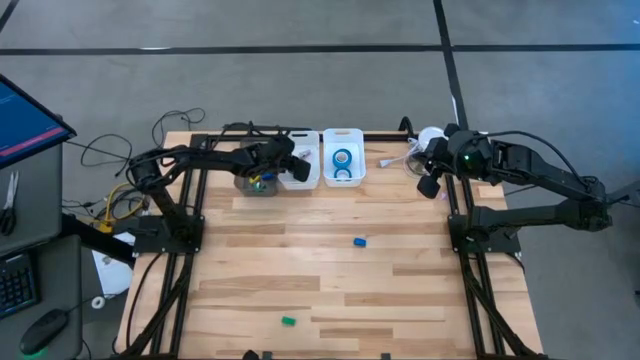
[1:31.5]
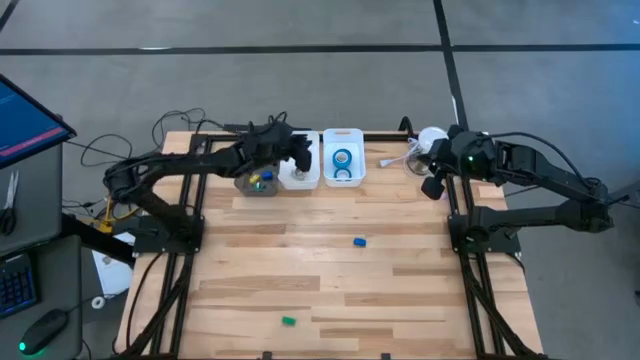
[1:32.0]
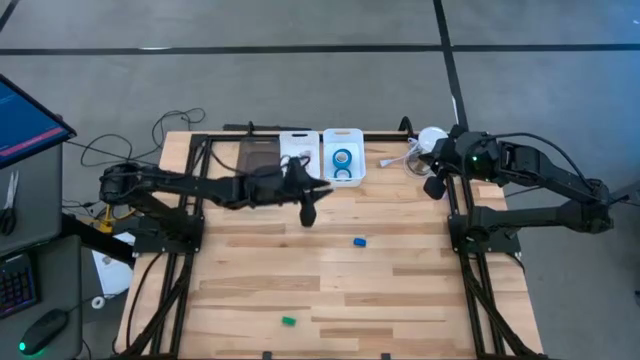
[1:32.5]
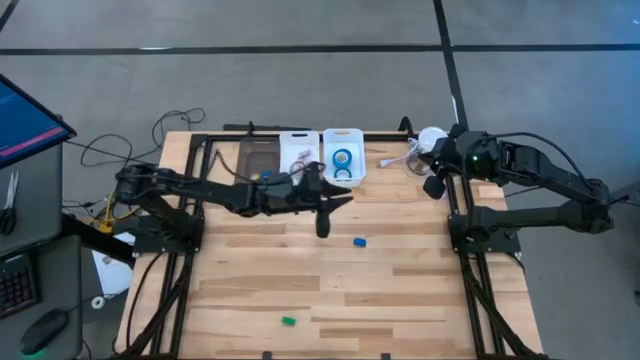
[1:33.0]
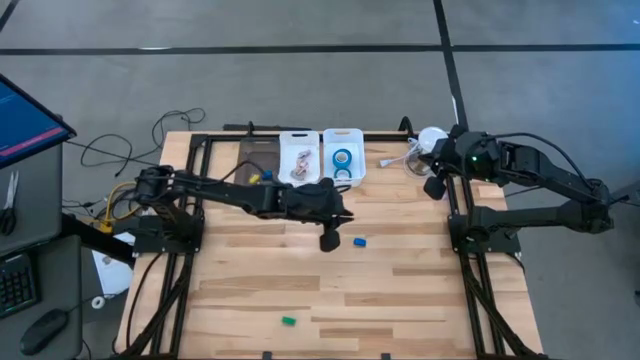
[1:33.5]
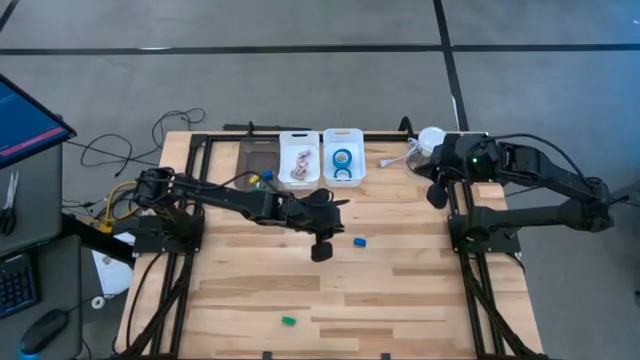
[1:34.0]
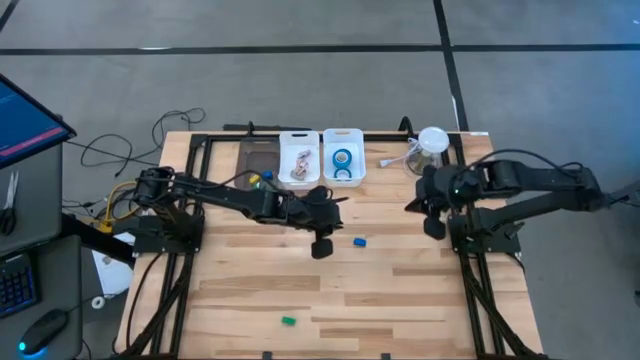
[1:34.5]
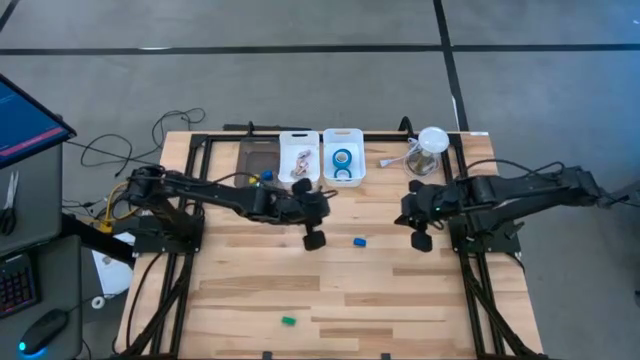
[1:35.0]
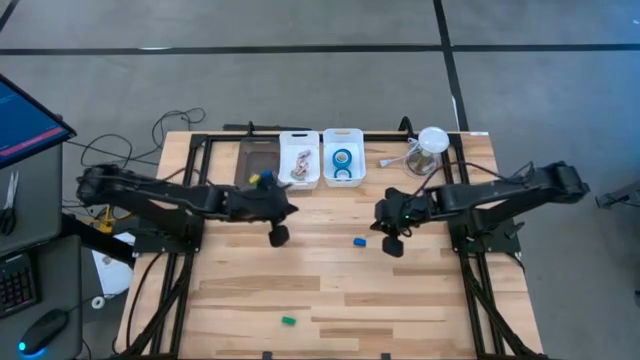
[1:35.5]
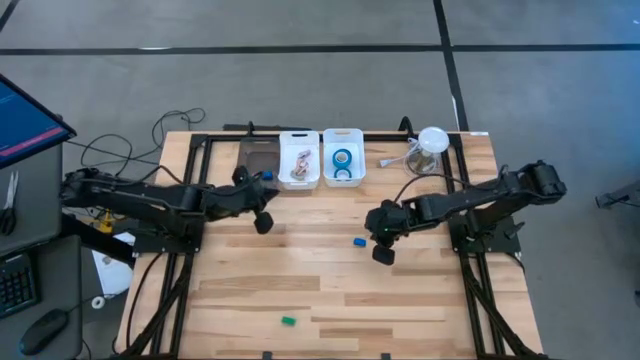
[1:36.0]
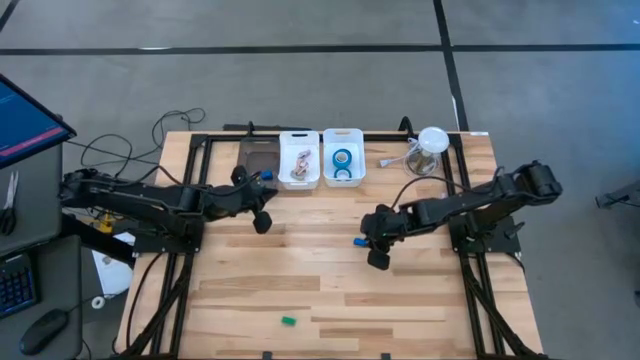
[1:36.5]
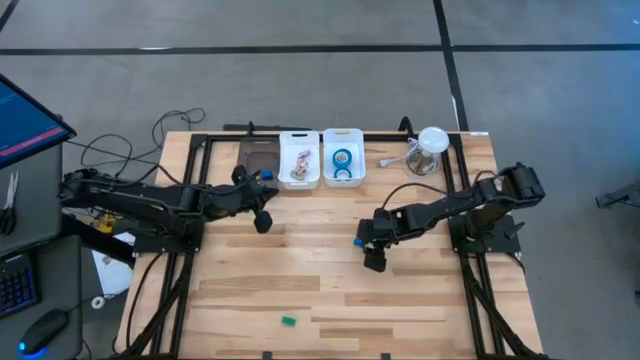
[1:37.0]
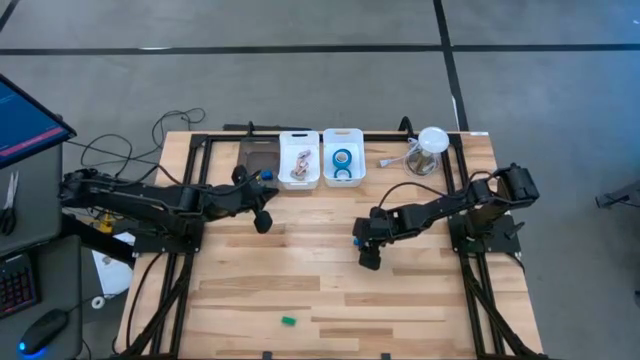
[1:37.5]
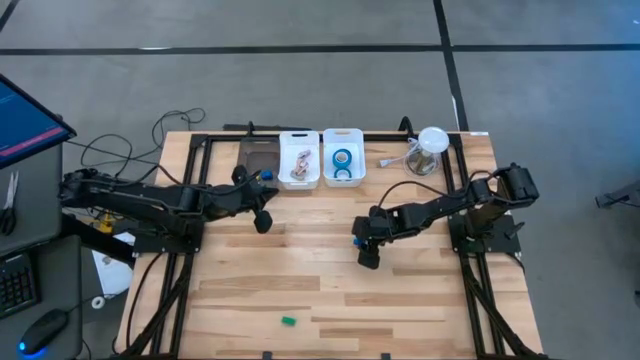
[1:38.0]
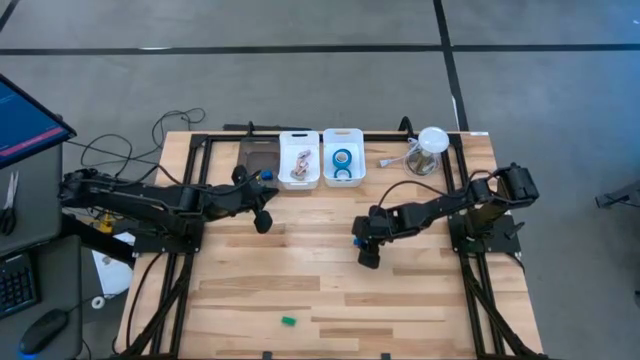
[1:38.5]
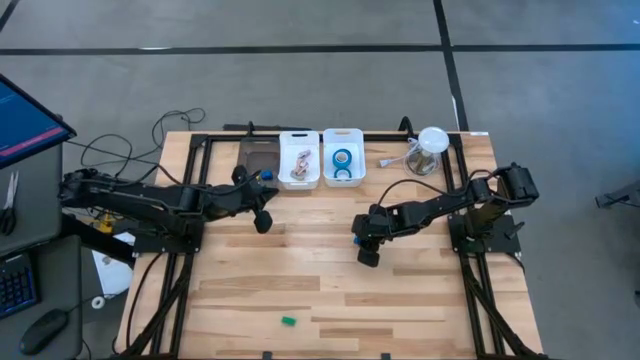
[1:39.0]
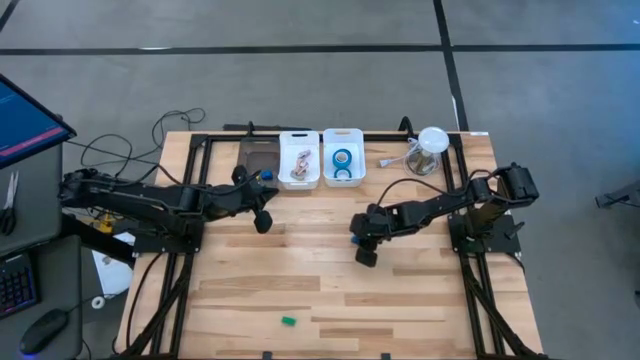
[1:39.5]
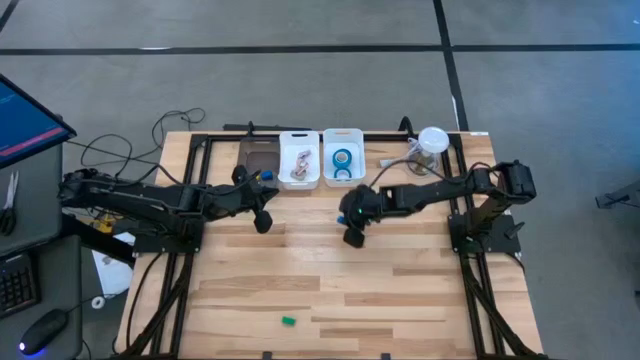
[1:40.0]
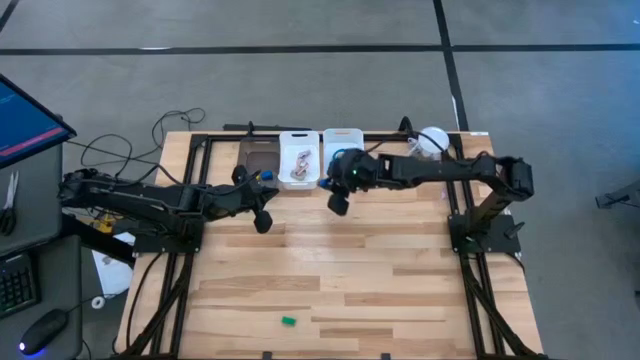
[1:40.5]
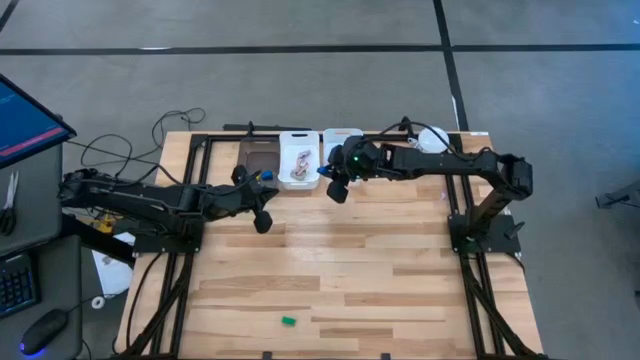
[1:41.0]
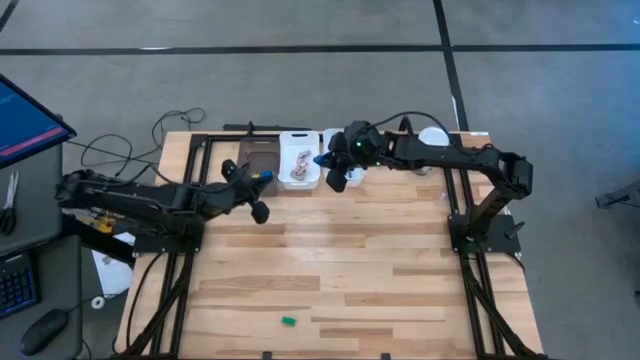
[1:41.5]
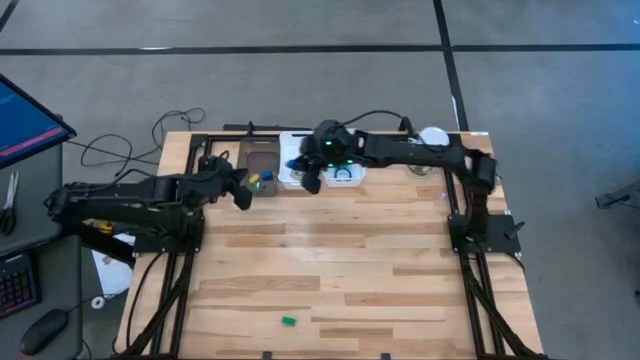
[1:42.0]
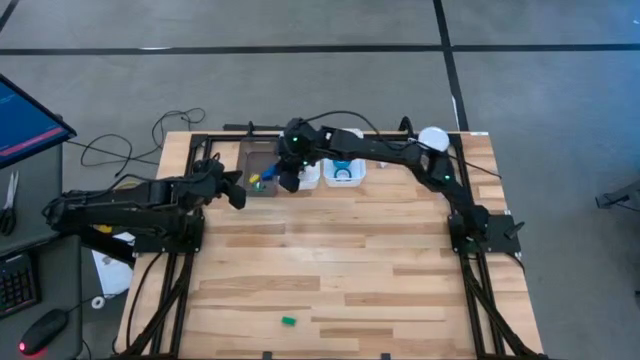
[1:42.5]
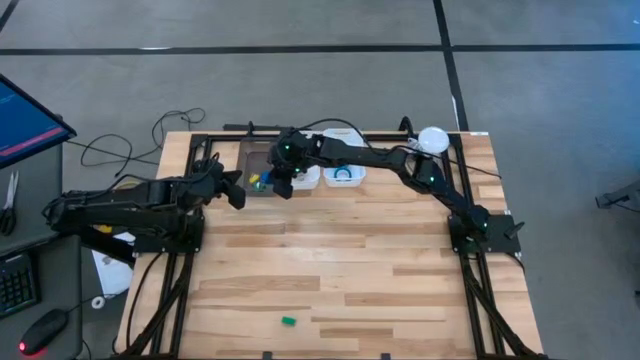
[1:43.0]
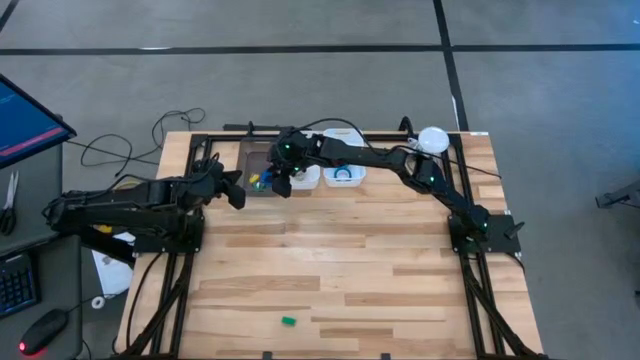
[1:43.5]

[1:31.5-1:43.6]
Task: Pick and place Stapler, Stapler remover, tape
Put the blue stapler into the black bin

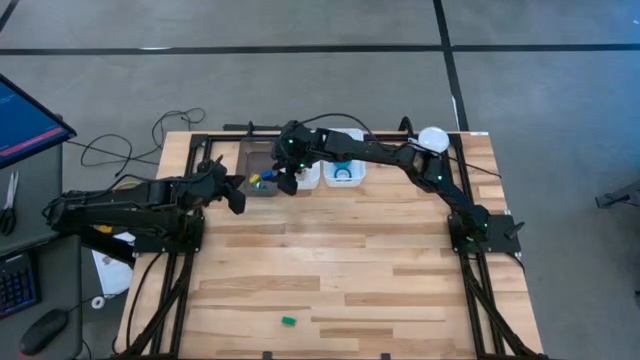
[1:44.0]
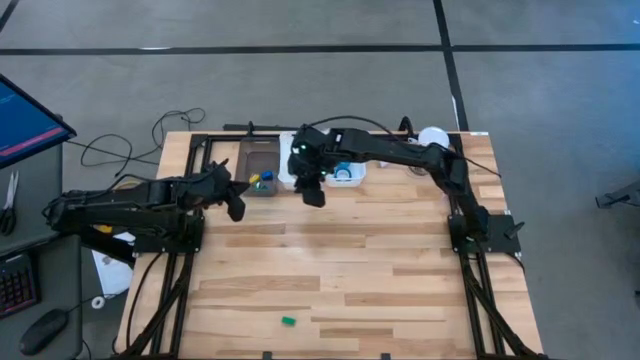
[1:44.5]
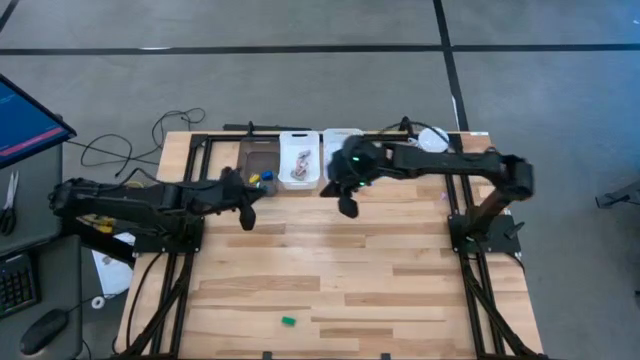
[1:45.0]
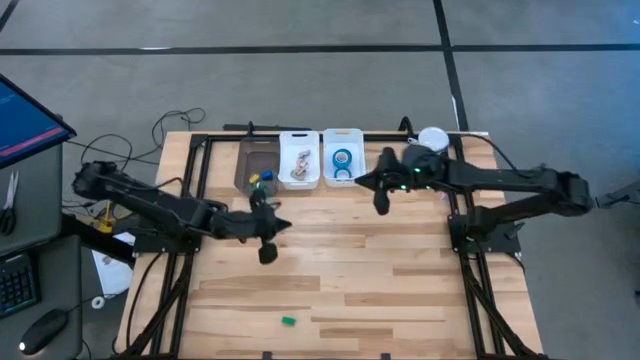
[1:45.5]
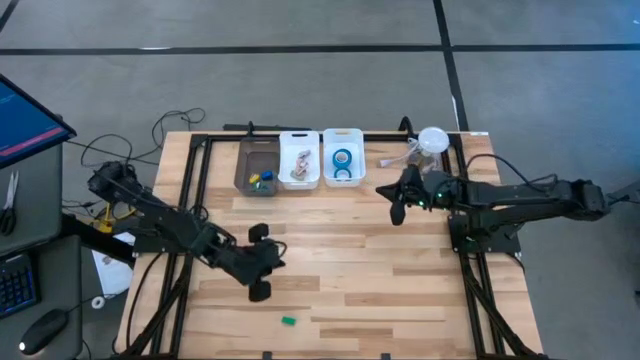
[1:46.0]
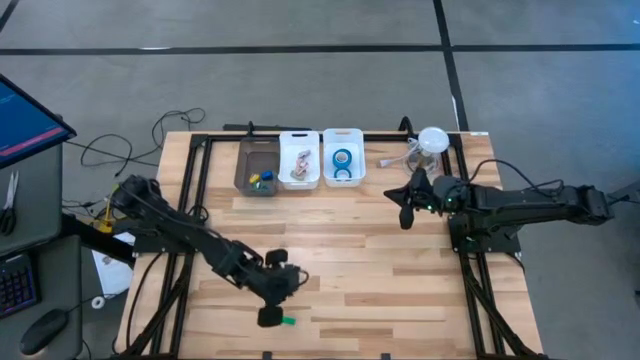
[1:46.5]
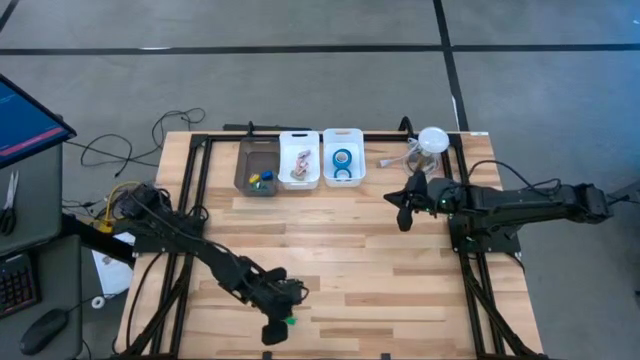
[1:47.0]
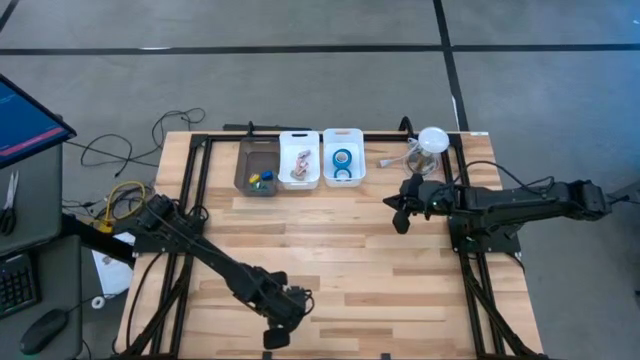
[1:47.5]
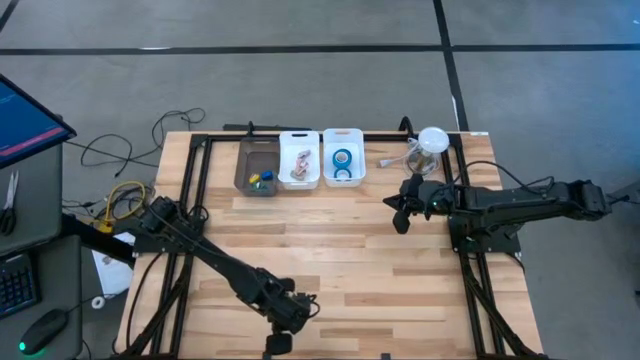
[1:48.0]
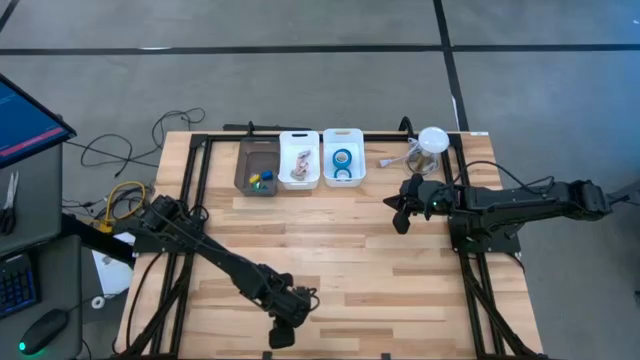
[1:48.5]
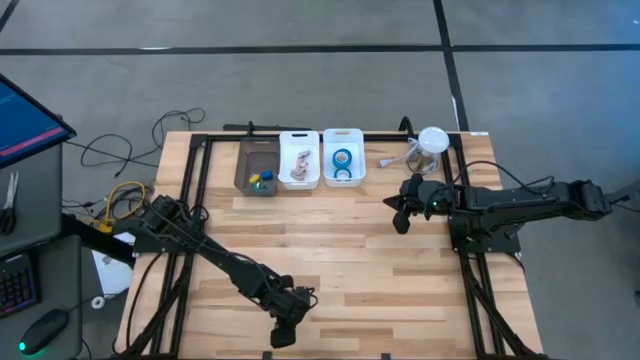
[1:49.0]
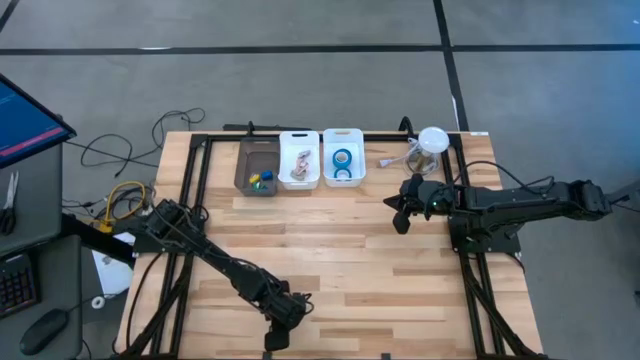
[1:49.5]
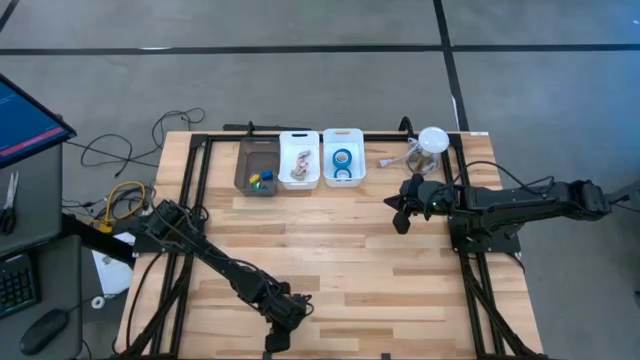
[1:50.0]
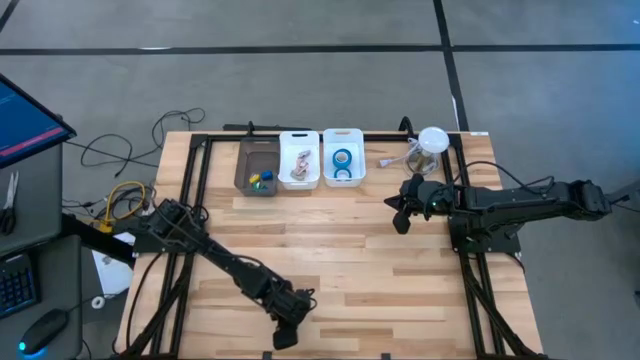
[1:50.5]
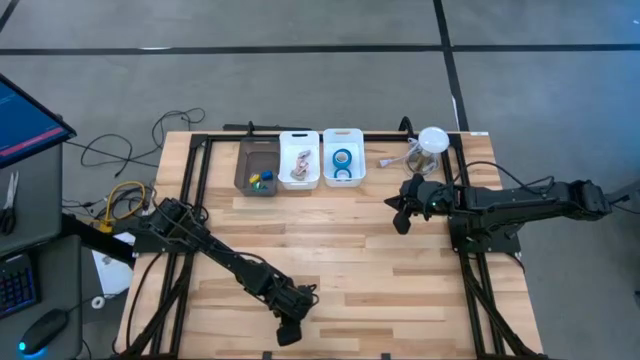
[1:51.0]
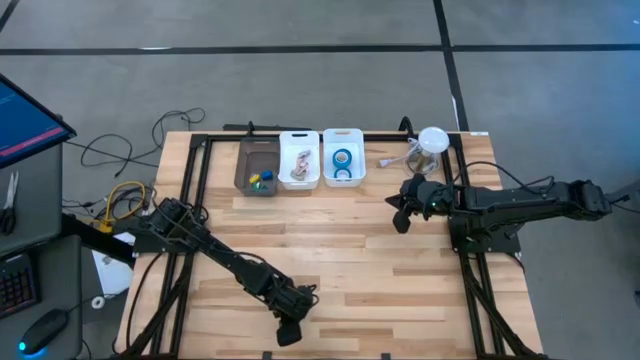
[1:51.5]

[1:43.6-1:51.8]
Put the green stapler into the black bin
